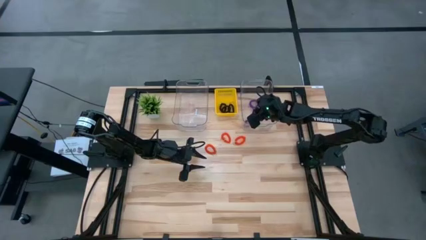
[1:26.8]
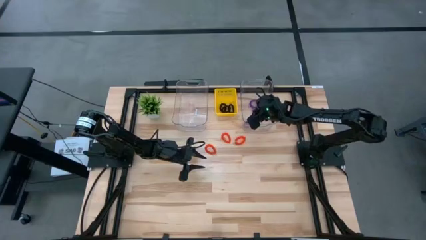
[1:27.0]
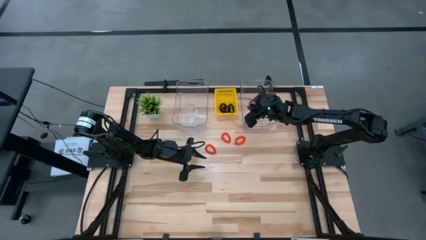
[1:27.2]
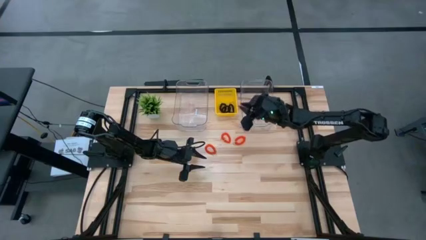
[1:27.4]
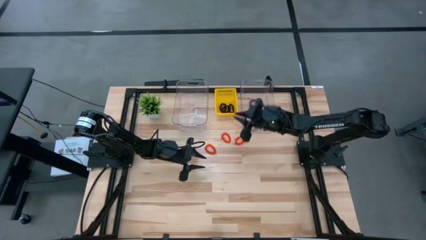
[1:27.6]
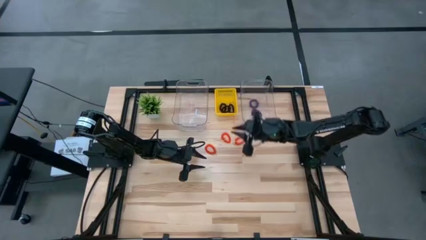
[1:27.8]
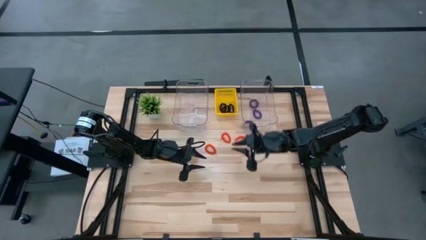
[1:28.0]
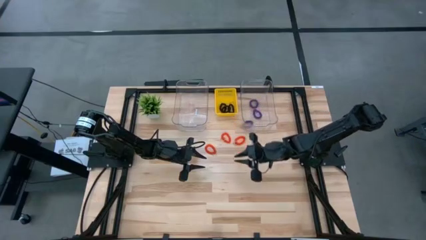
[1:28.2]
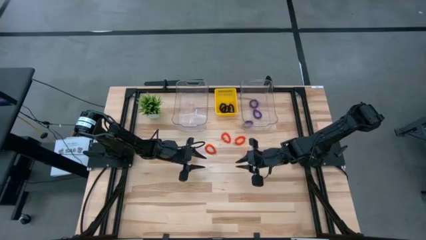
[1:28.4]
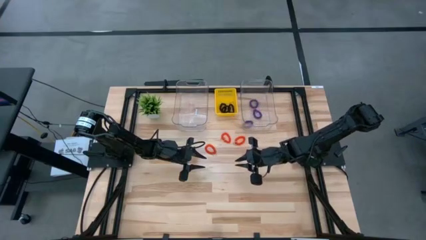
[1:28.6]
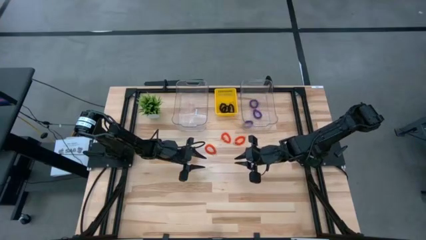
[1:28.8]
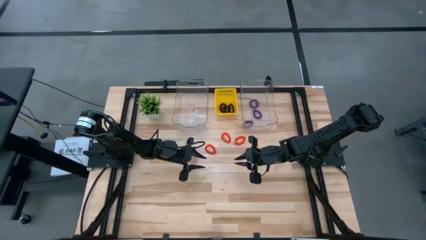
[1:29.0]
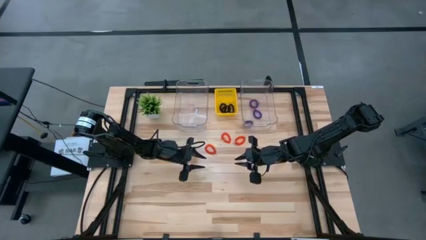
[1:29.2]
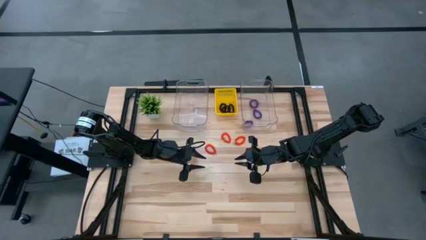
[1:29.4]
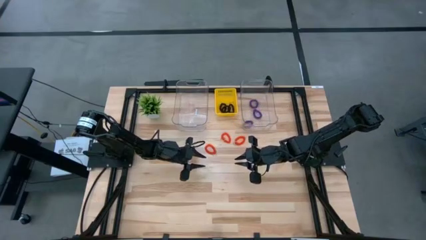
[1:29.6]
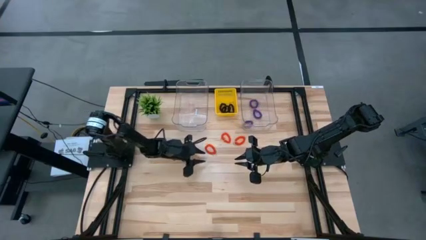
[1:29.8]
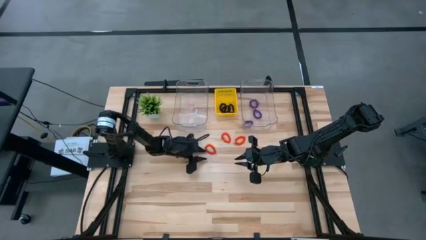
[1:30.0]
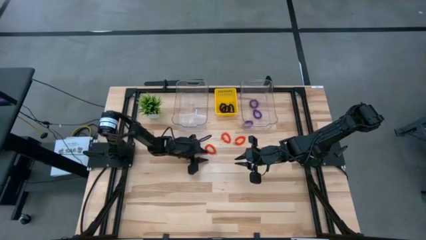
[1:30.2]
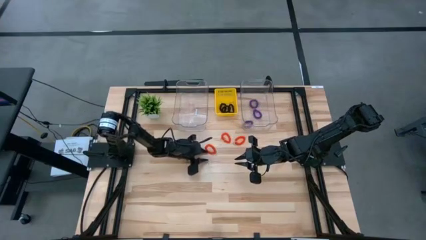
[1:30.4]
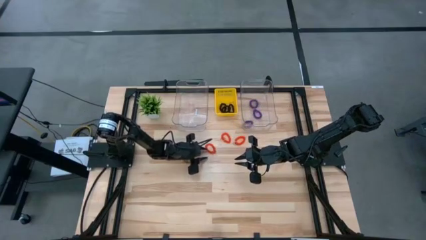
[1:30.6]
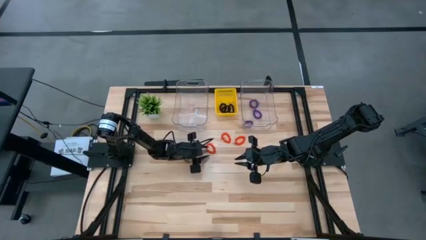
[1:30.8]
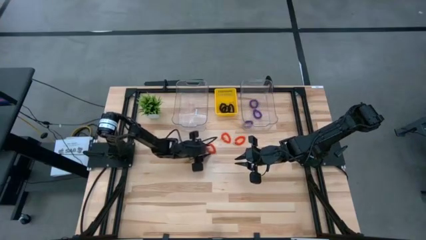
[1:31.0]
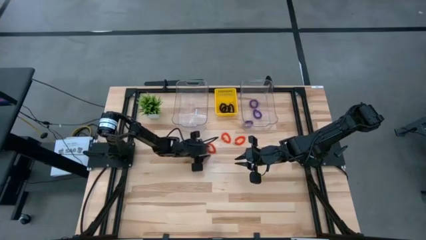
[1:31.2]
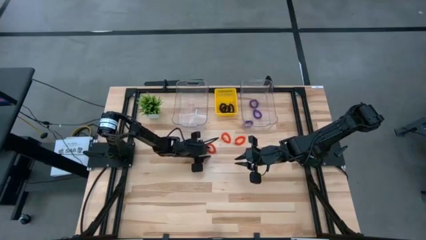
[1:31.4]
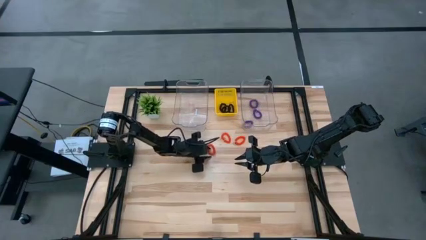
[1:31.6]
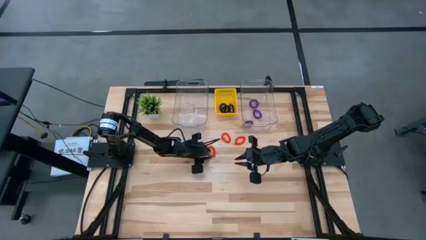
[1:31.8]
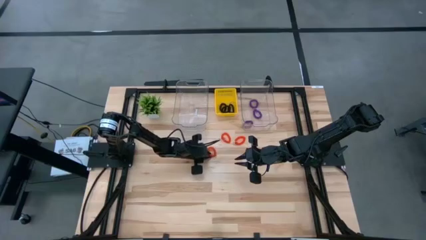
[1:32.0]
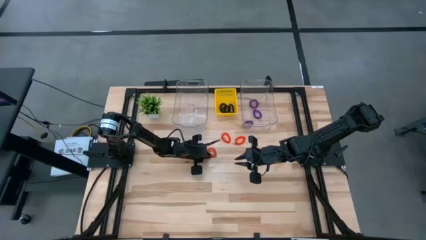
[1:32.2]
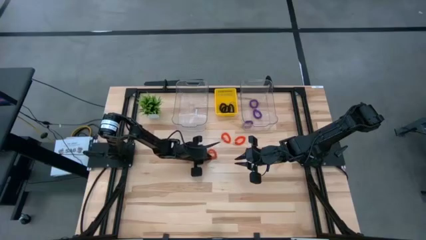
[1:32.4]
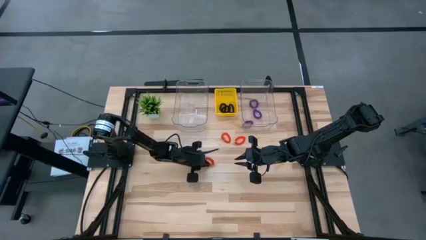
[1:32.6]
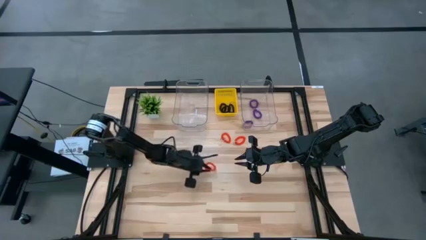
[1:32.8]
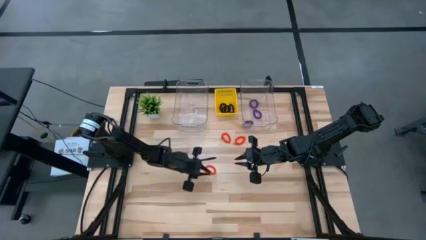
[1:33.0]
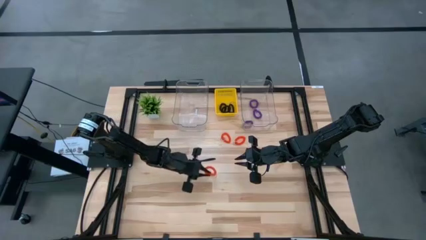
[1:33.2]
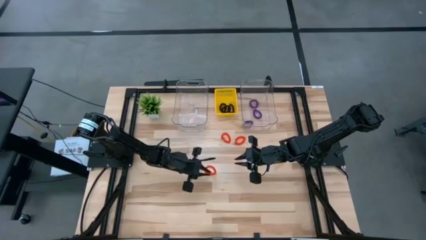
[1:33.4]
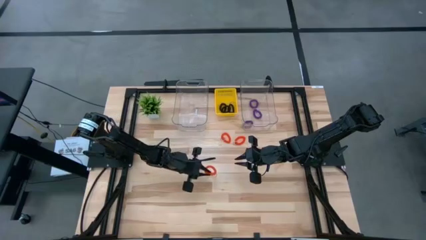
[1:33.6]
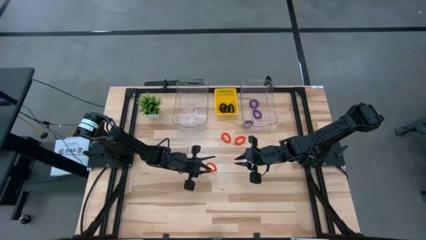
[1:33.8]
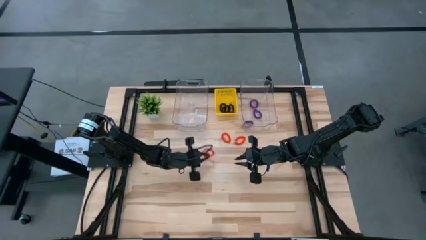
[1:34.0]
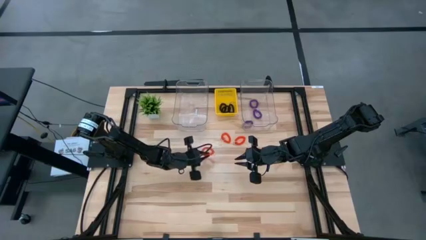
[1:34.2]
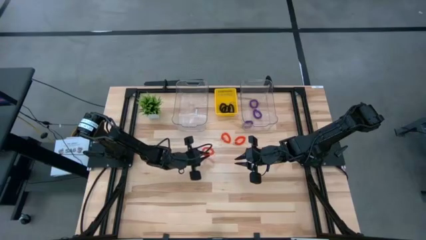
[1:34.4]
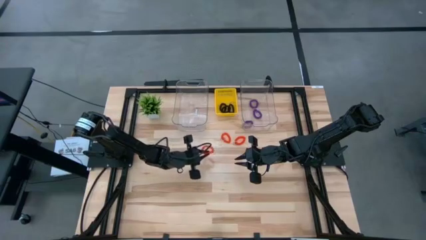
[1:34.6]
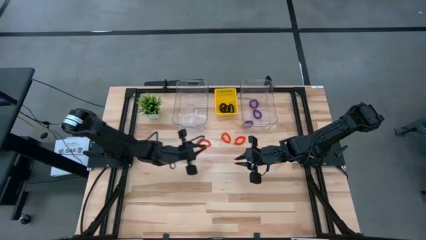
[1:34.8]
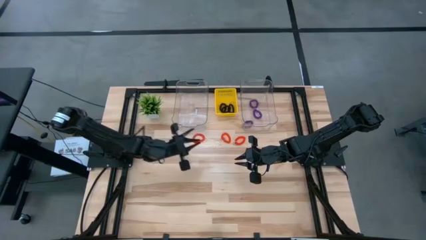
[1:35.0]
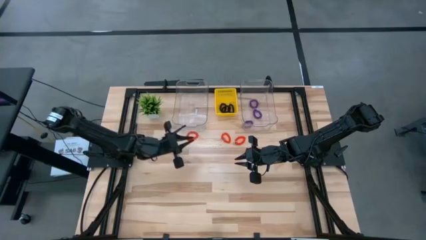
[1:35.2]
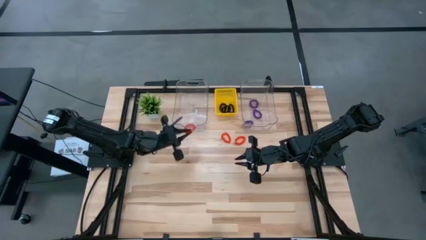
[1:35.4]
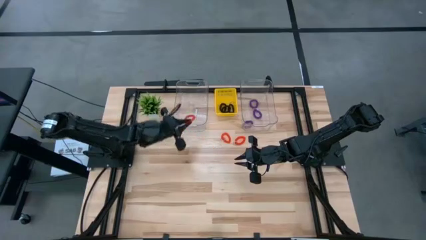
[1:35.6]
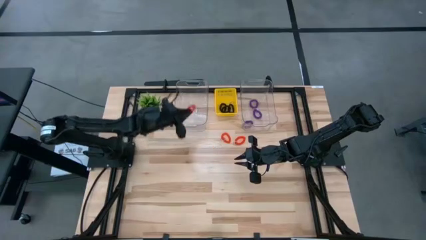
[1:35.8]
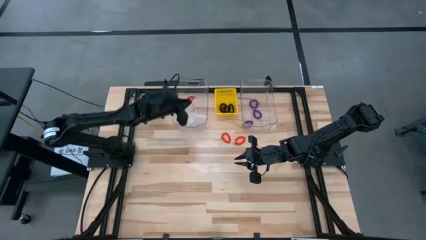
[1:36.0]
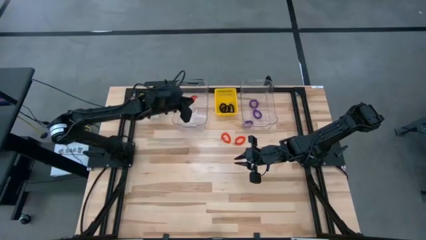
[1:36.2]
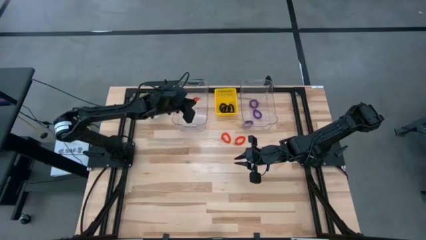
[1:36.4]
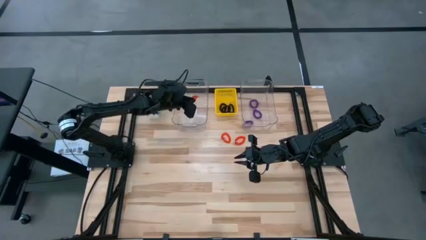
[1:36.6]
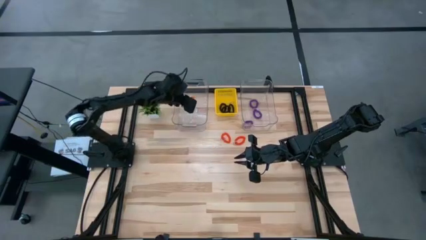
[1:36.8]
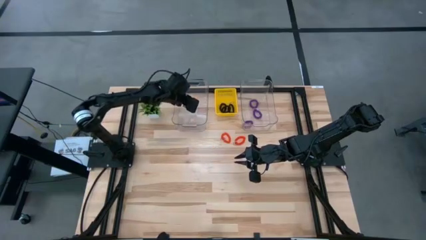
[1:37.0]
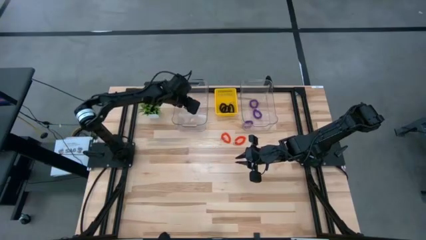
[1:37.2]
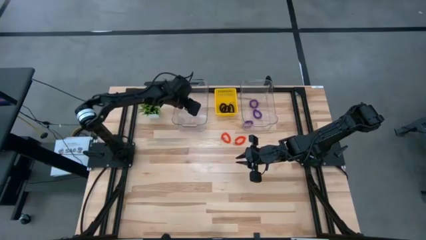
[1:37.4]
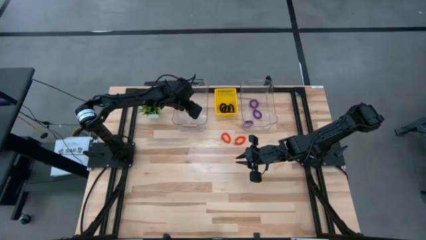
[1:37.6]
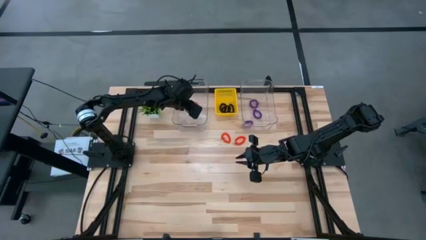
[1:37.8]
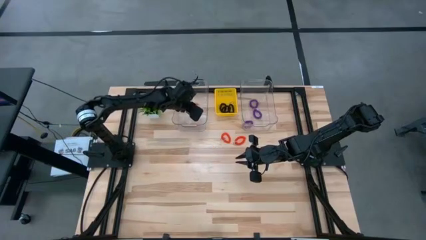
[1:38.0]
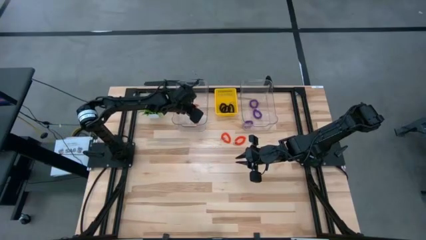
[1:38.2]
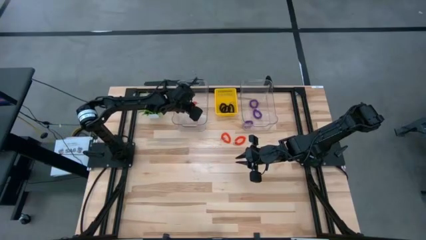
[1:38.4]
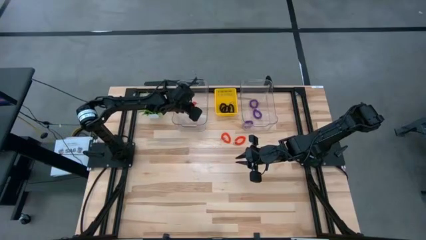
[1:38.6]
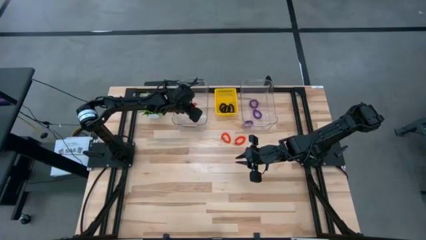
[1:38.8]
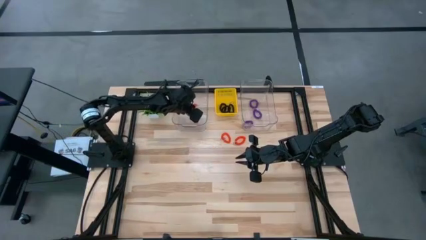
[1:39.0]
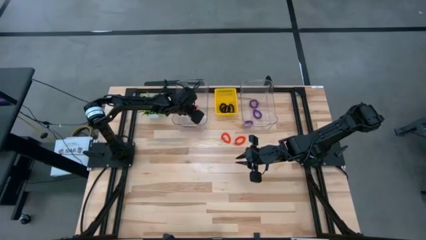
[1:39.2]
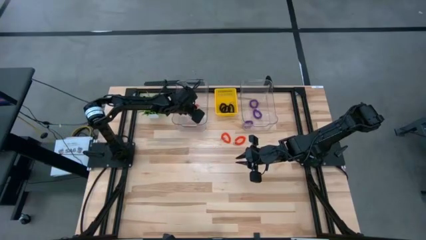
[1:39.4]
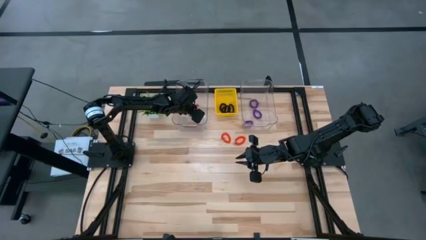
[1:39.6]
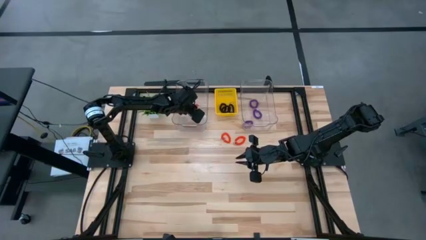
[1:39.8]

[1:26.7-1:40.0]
Task: Sort spring keychains
Put the left orange spring keychain into the left transparent bin

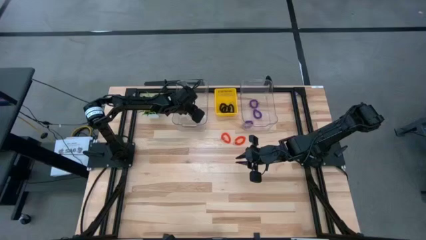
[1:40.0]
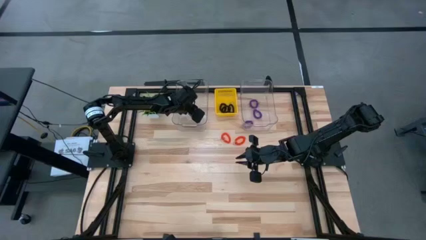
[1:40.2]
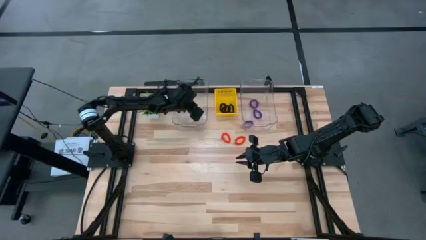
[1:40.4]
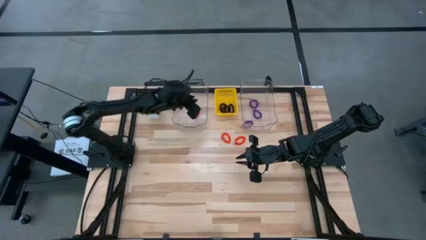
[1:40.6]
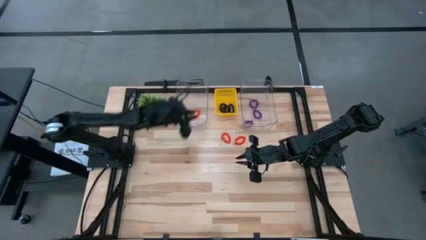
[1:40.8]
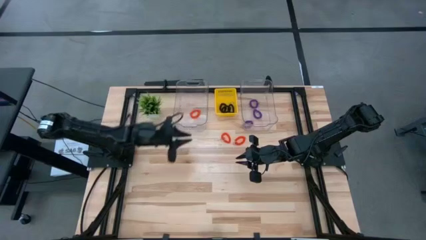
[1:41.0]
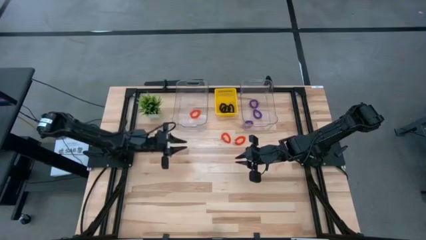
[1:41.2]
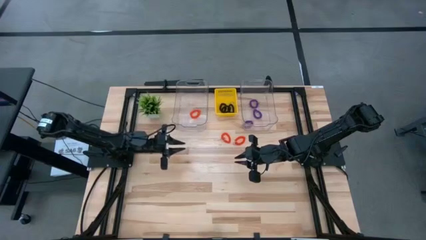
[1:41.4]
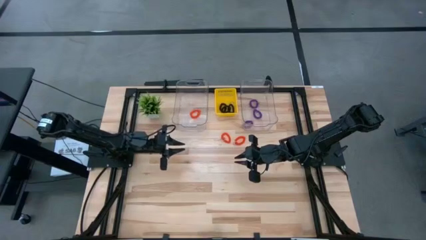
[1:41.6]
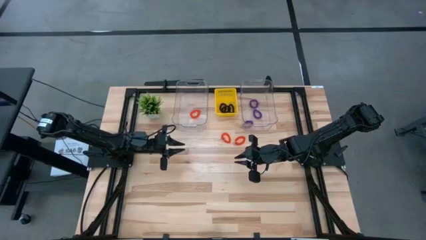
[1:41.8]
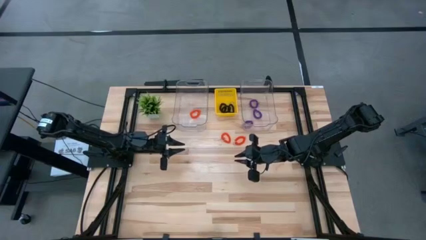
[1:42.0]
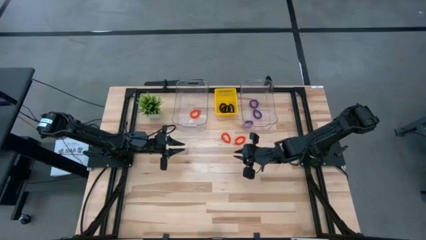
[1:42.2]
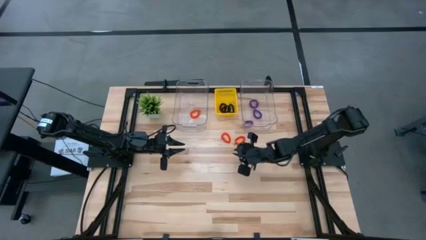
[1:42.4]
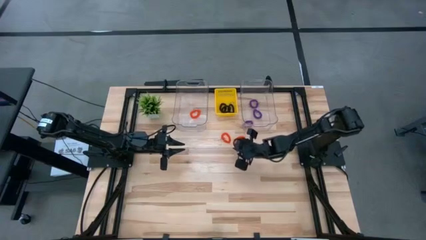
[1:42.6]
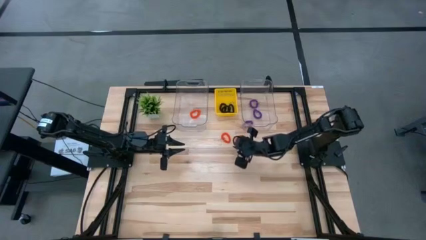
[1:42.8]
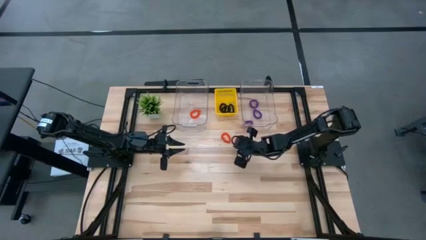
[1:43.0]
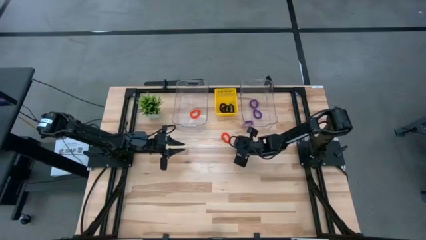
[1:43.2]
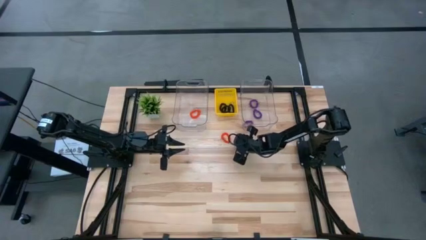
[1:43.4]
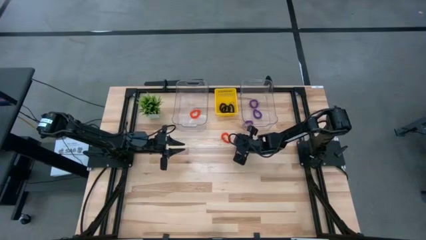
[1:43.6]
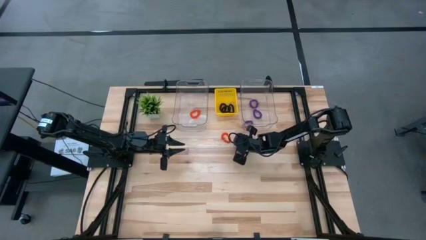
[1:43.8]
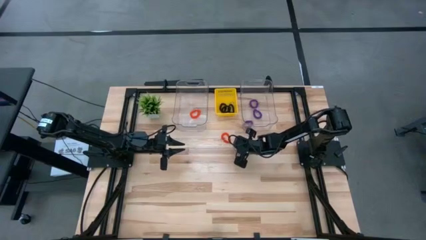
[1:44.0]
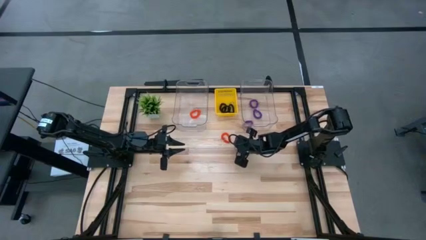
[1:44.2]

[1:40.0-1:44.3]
Put the right orange spring keychain into the left transparent bin
